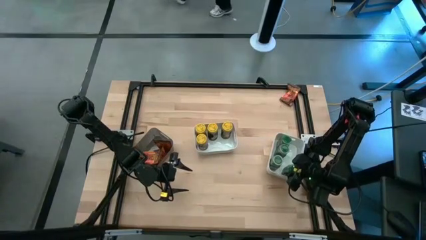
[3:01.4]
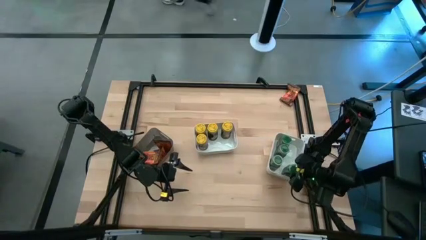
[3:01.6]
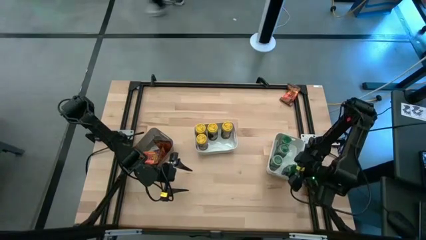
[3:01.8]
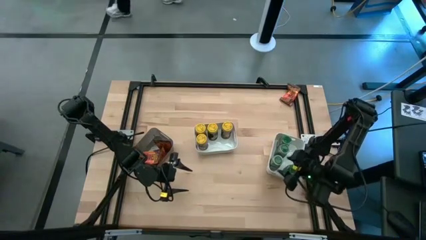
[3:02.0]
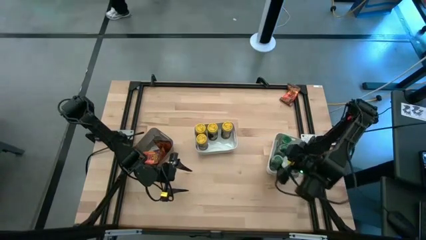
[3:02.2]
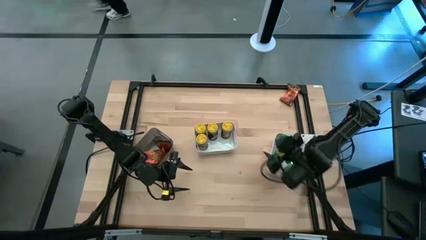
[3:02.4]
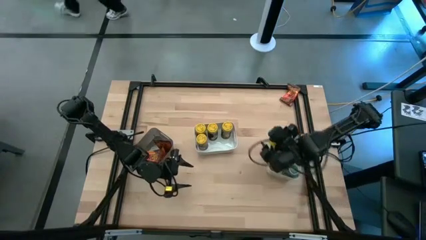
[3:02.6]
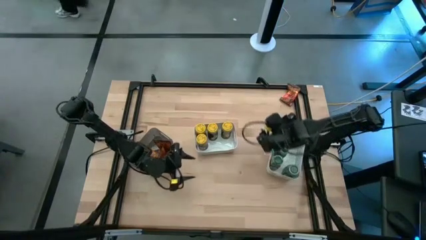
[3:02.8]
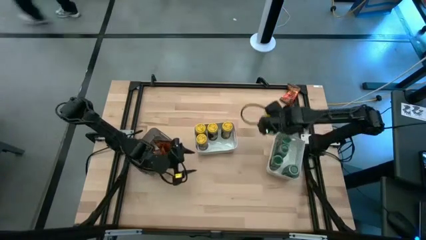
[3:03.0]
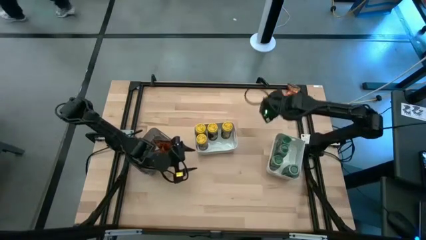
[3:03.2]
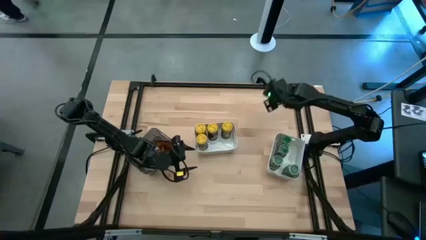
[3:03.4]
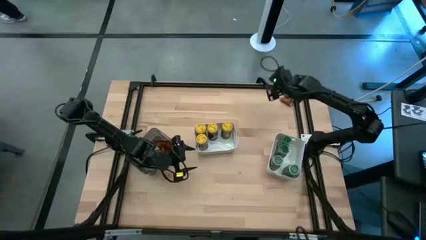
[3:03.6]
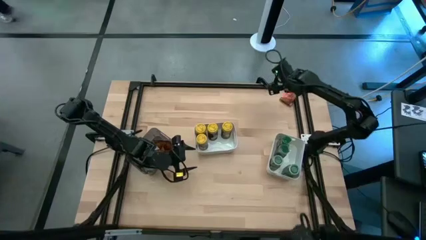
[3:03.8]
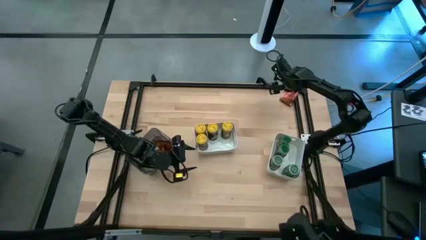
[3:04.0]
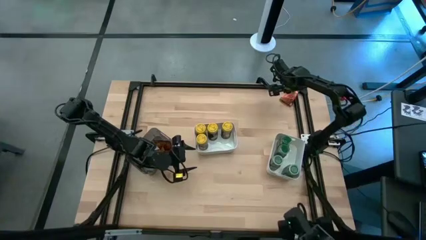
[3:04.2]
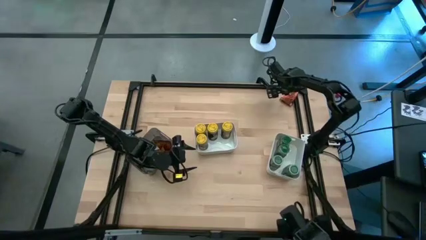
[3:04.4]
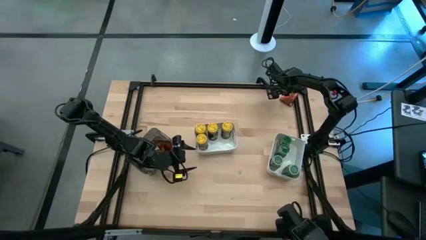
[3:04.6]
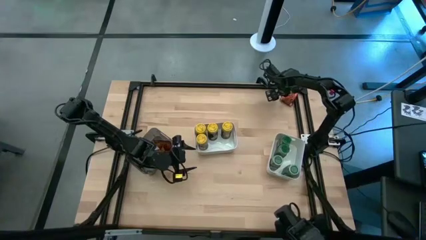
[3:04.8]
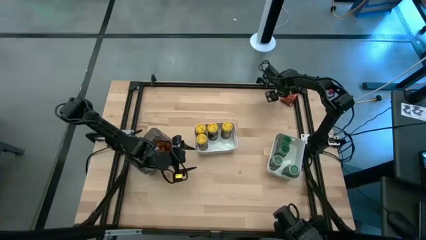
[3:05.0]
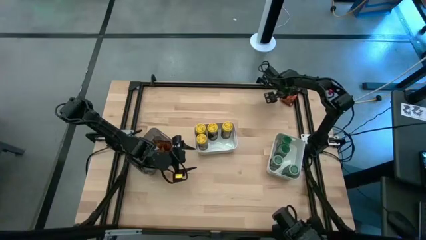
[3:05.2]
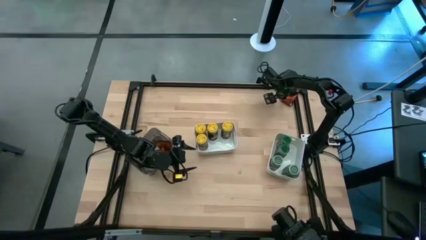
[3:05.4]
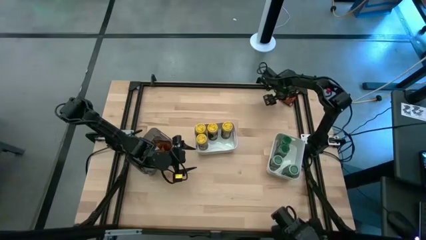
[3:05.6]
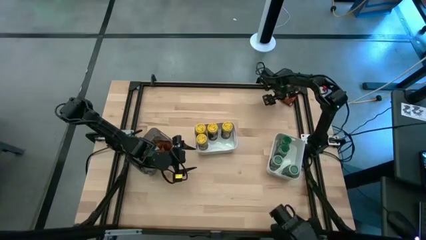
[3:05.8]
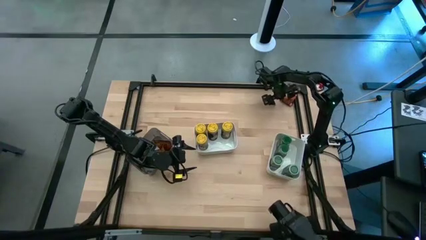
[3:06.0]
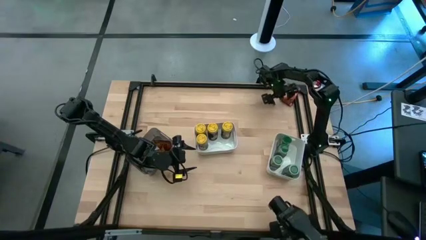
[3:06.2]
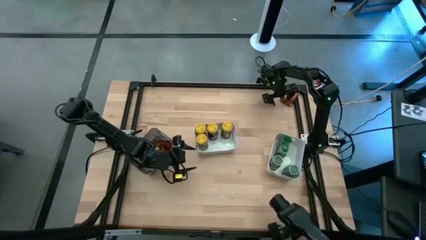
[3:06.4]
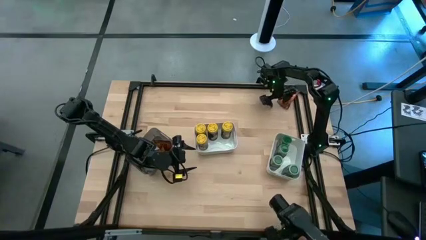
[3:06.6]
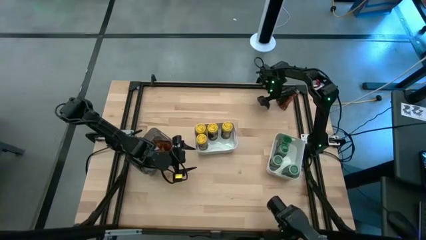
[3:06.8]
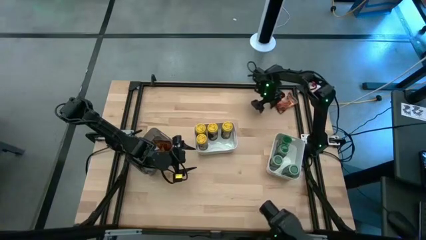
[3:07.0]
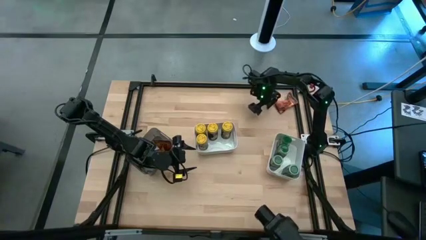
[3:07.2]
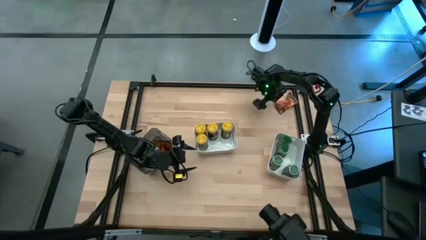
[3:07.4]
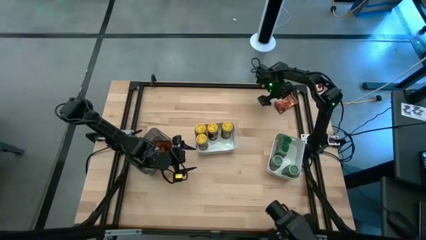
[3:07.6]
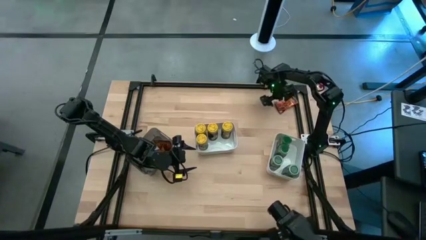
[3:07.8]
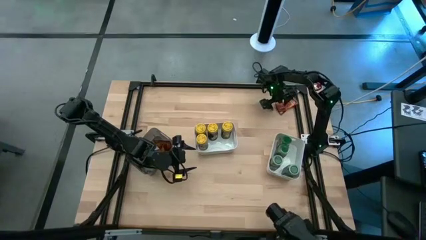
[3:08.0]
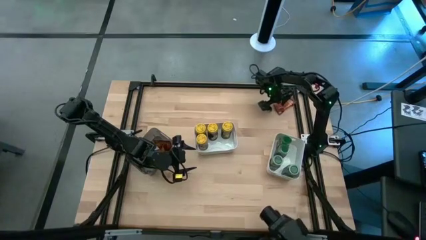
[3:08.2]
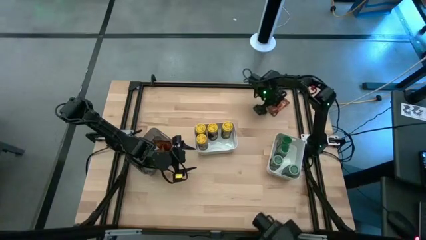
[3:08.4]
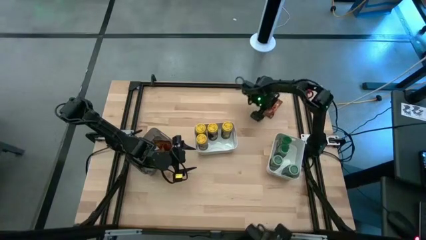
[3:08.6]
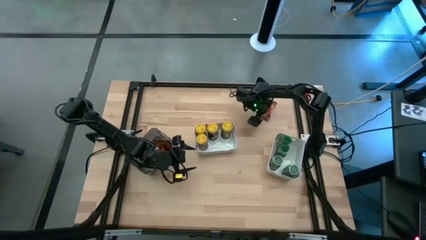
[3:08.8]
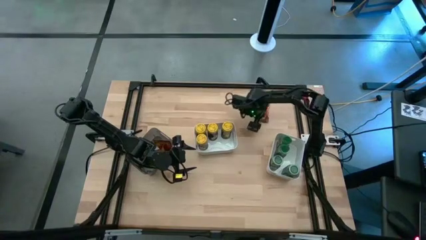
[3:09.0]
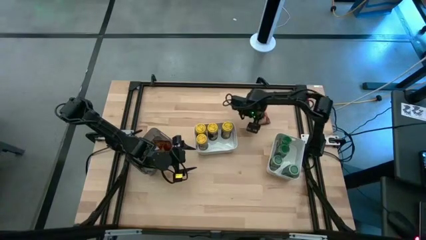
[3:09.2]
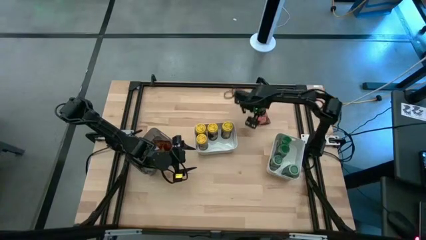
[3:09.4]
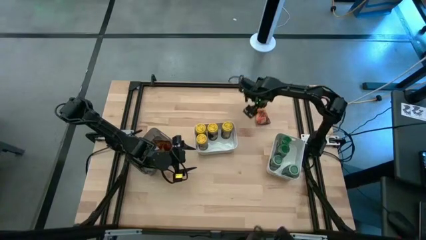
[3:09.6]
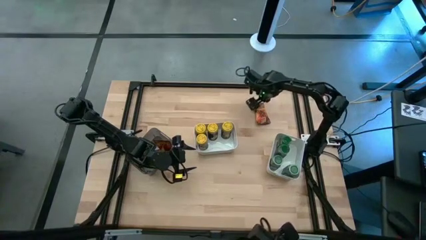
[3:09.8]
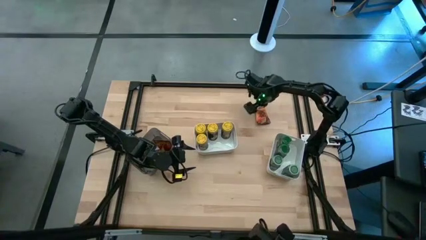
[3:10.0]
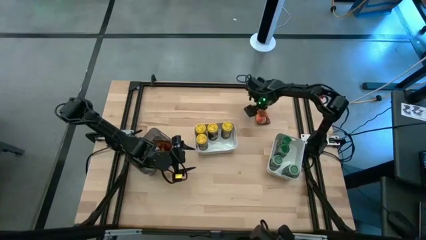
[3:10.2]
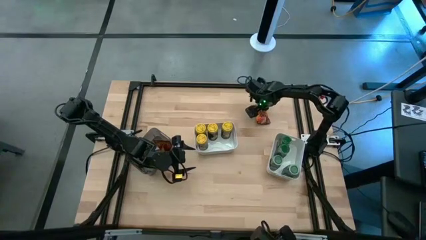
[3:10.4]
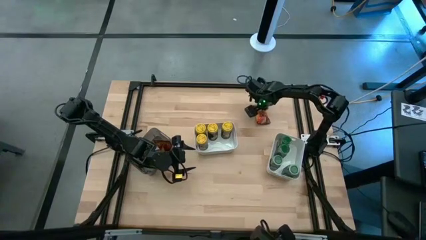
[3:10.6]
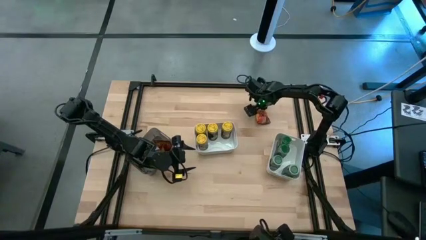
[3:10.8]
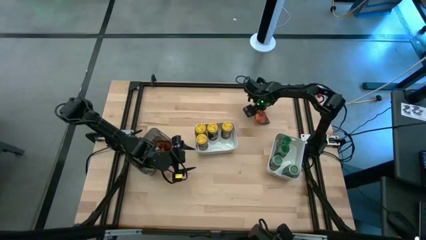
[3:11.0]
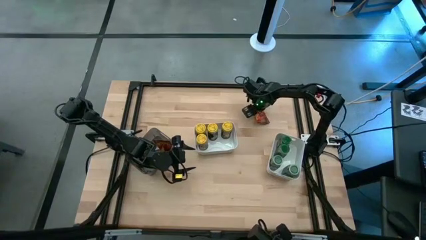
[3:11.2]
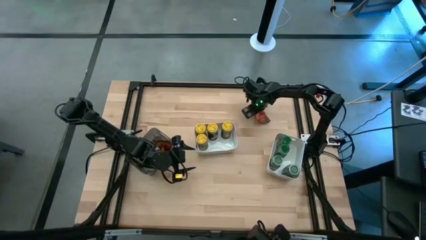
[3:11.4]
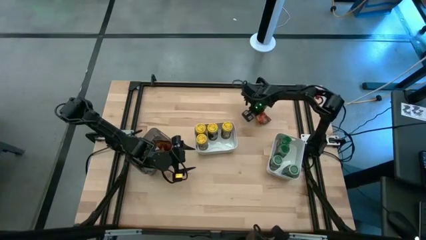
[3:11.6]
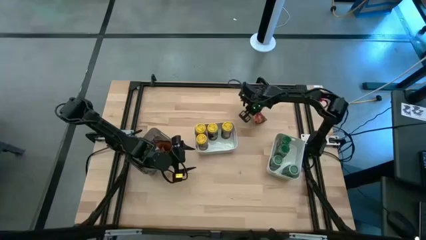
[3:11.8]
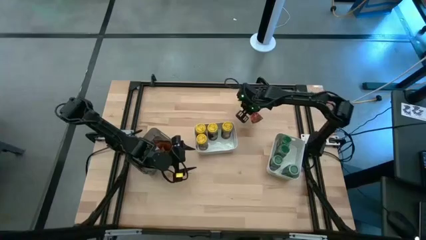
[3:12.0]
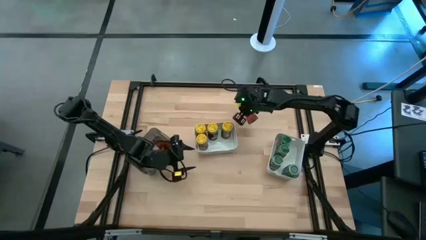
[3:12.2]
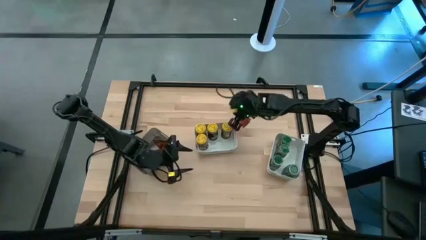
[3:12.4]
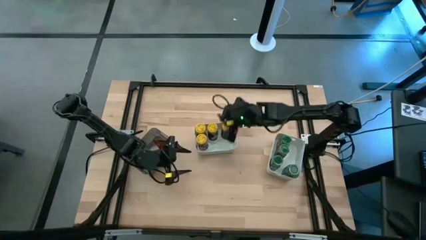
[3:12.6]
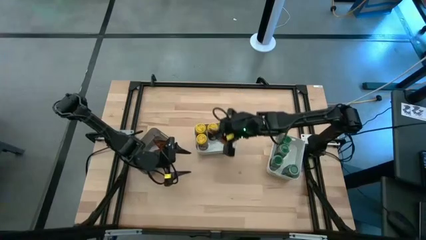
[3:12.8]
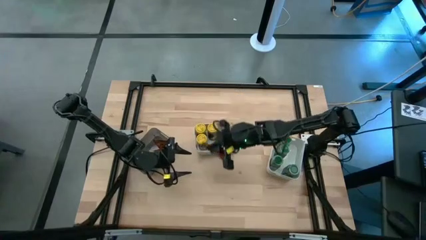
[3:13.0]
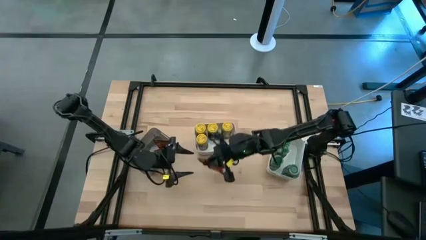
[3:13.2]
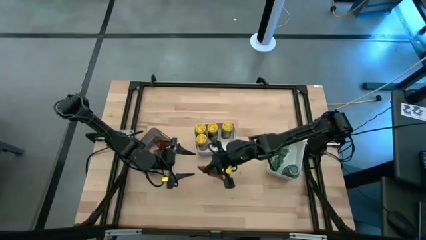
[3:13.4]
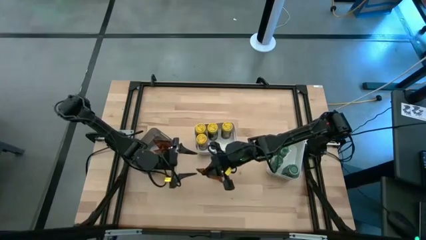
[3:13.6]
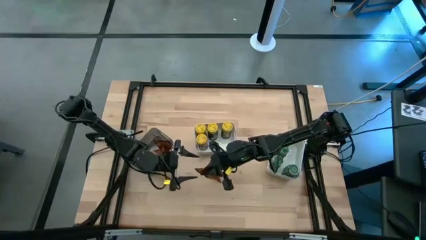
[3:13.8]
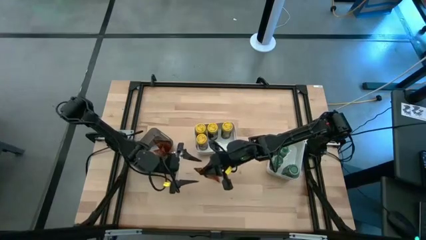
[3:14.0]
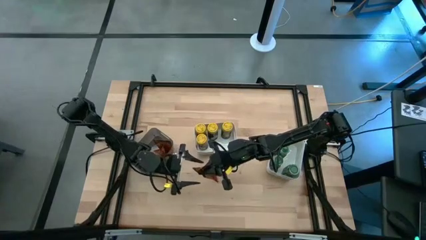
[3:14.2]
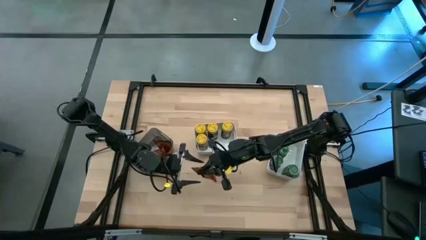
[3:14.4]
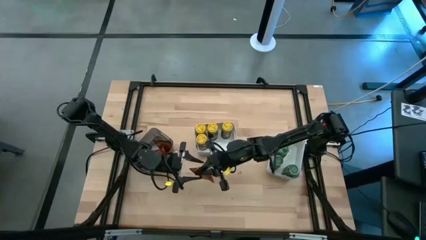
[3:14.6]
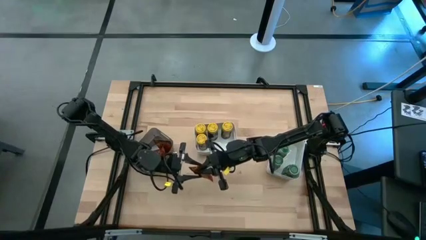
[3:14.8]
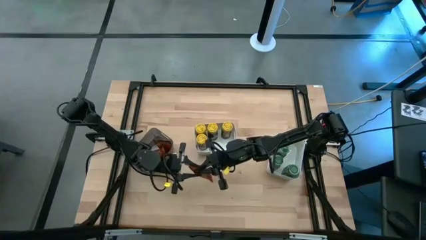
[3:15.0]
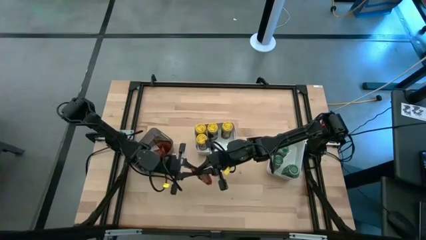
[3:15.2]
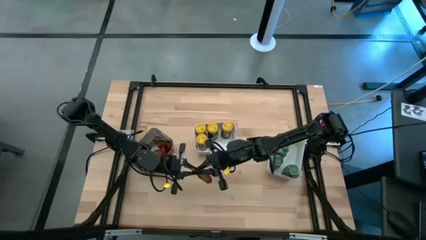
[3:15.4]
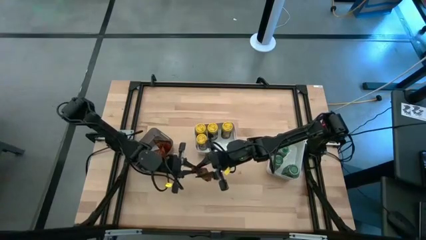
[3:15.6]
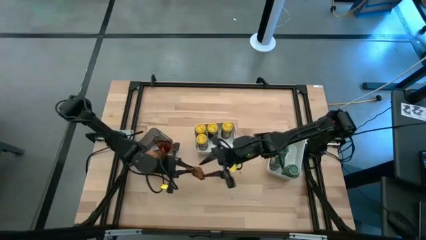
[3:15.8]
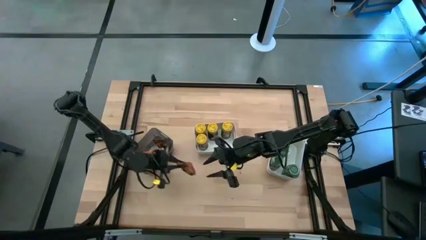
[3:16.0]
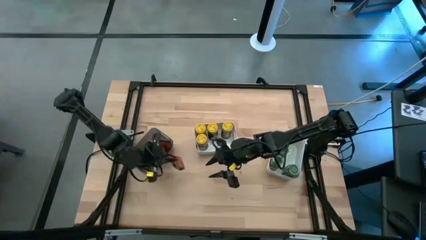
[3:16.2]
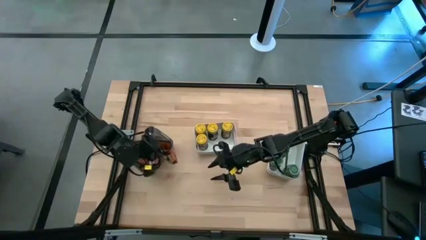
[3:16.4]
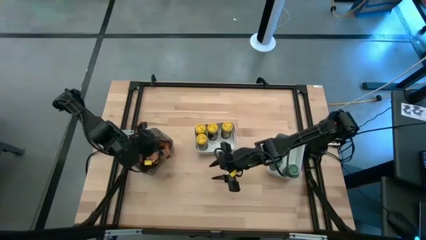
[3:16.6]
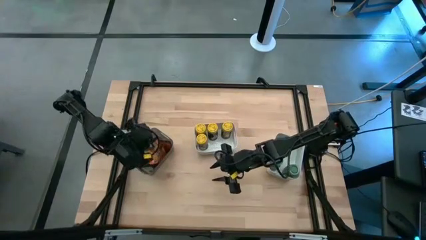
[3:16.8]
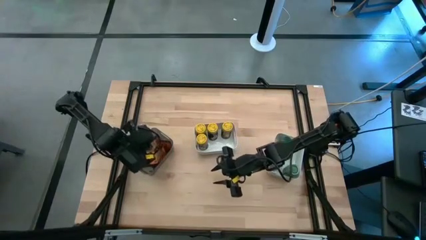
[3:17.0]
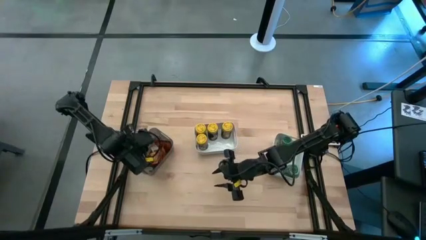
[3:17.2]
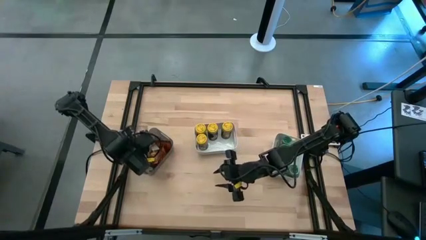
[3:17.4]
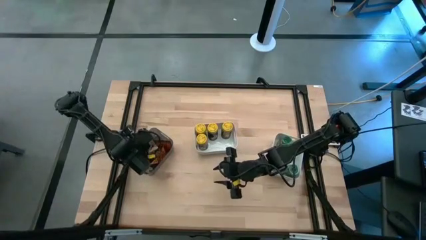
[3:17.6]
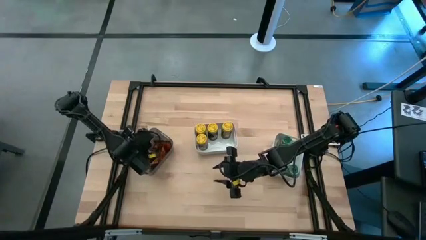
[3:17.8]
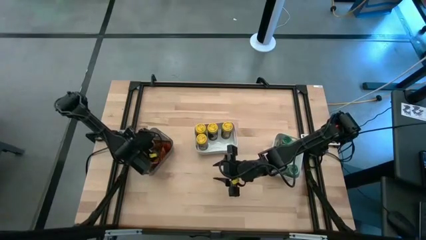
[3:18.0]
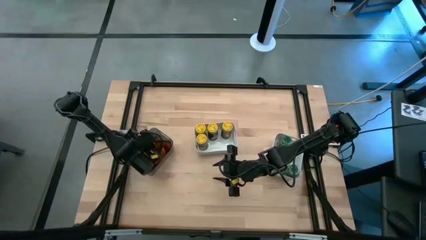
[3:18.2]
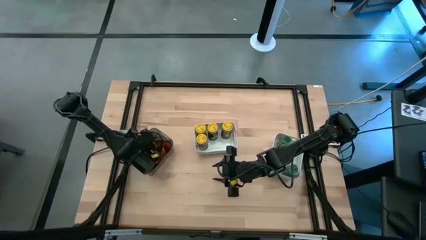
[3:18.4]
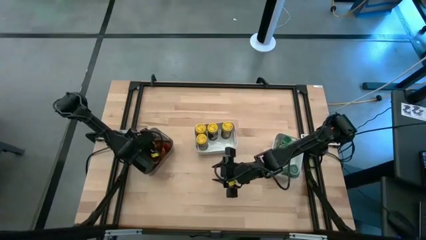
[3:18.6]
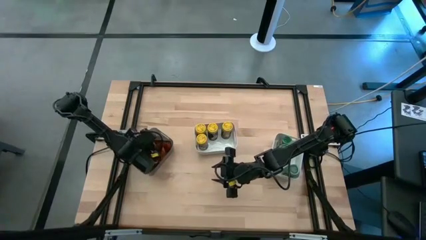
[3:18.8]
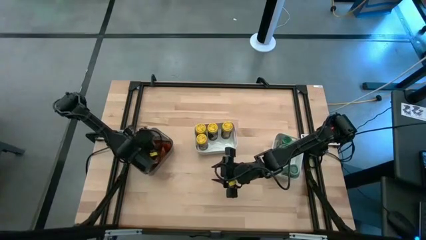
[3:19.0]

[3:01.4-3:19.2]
Task: Sort spices by type
Put the orange seasoning pack into the black bin
